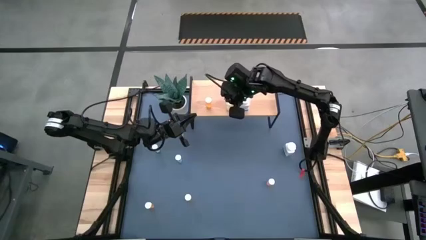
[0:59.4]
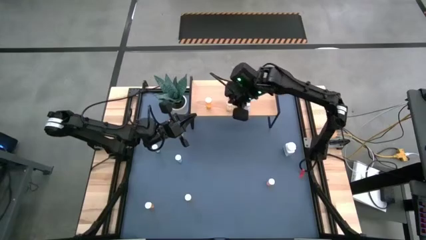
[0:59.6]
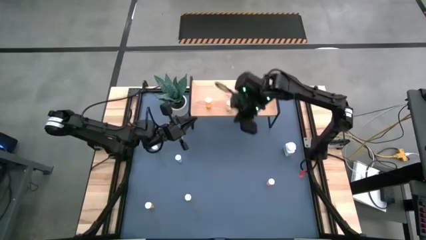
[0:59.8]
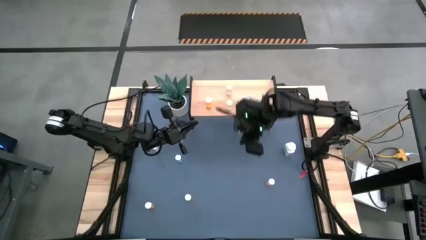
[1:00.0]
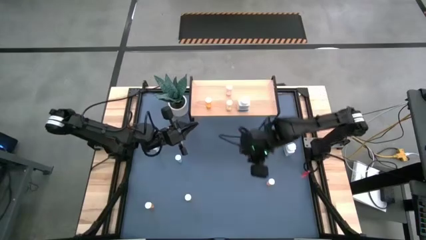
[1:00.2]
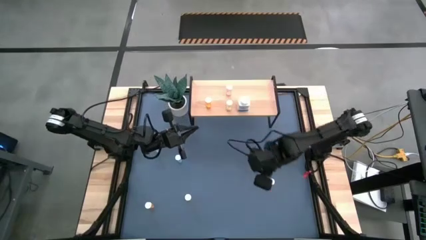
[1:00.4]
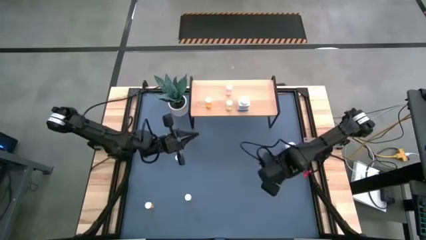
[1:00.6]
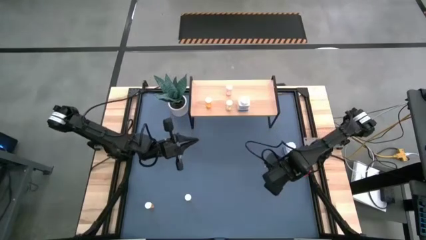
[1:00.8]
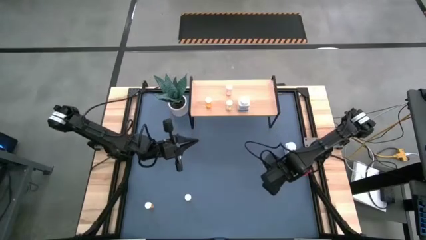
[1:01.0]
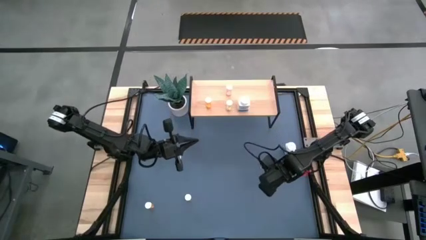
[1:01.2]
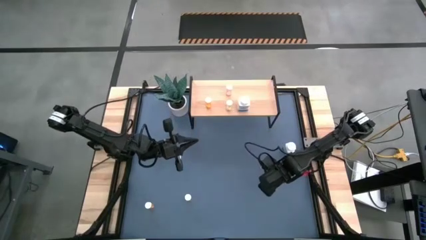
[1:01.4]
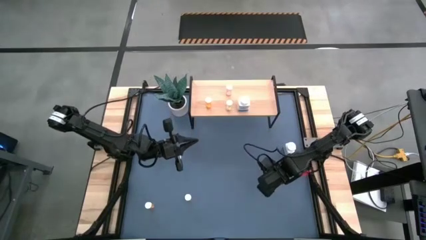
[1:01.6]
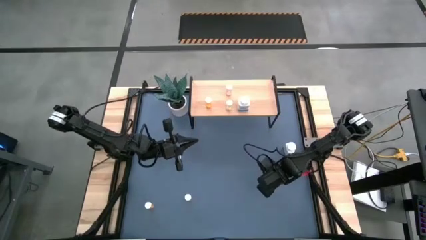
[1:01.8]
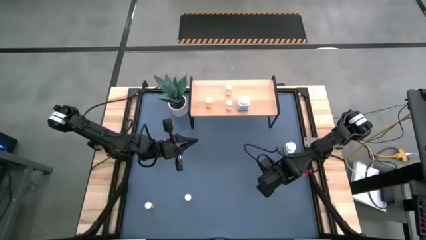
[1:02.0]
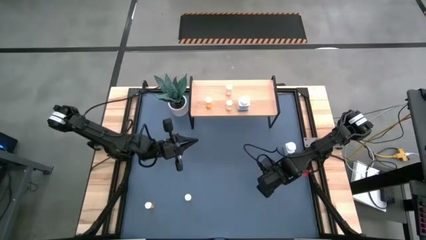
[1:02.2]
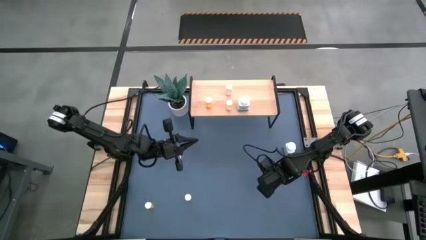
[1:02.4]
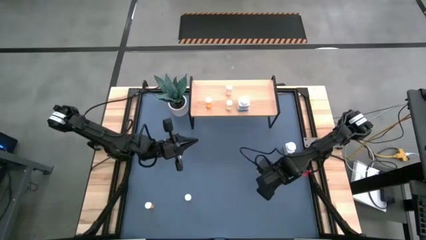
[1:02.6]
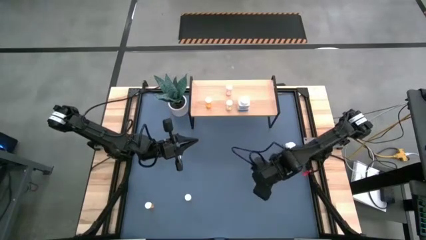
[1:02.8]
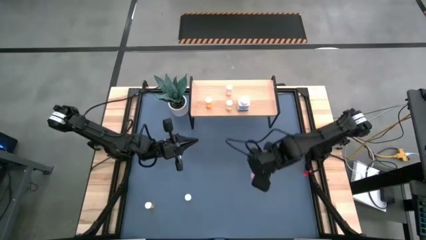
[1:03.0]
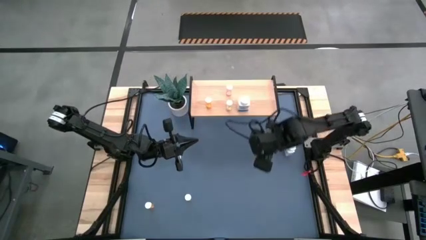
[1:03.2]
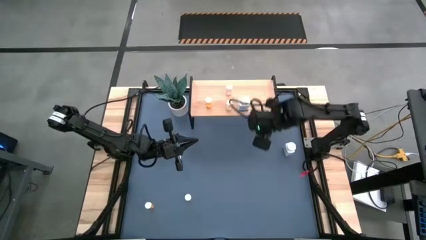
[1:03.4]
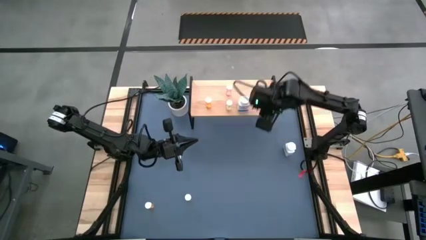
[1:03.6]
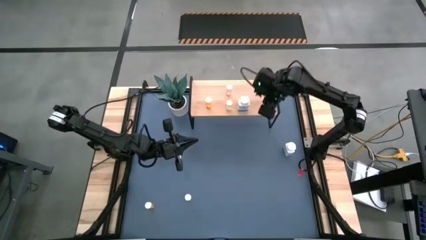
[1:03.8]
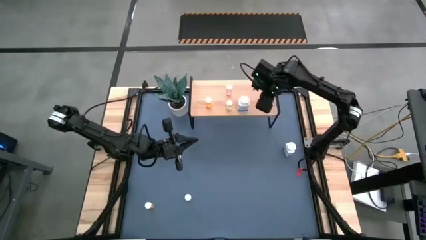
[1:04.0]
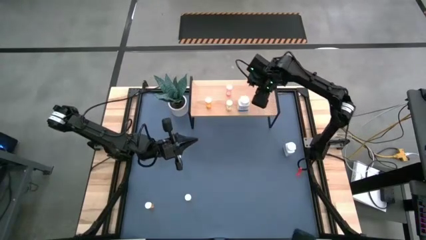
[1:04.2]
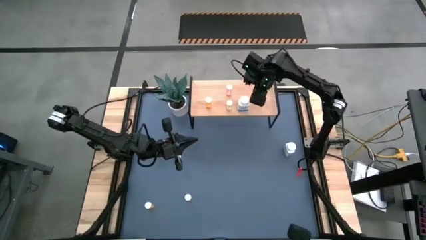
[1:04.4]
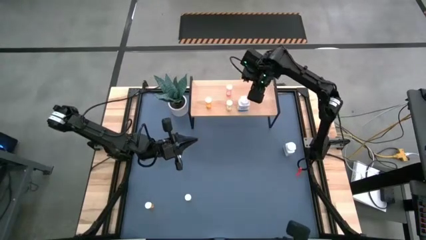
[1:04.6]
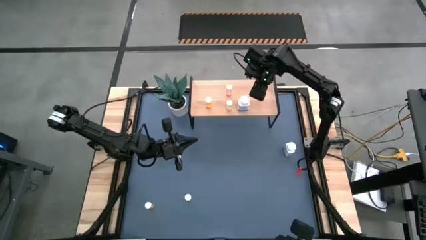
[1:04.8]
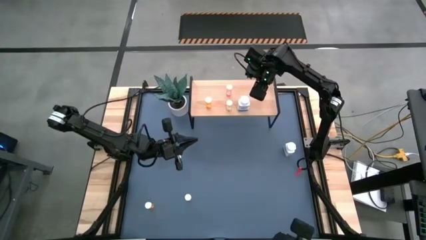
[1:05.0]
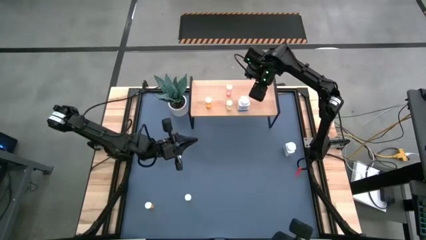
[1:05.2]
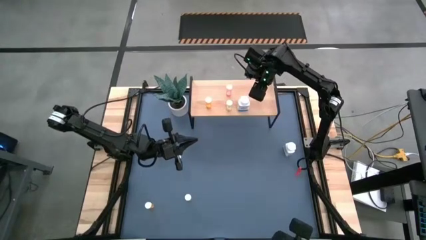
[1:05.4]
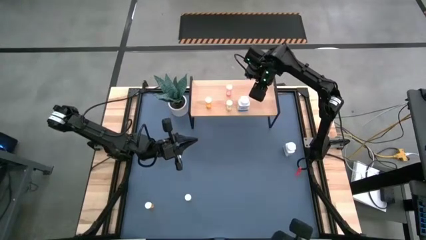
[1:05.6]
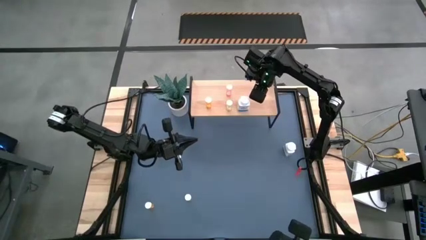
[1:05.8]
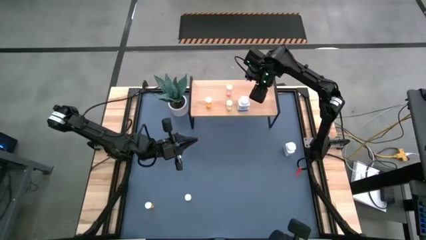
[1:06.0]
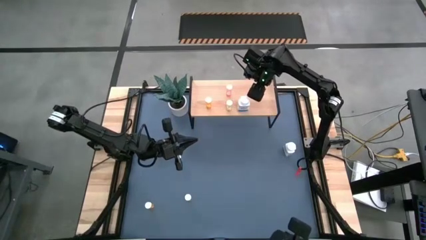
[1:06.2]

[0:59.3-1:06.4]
Task: Pick and place medicine bottles onto shelf by color
Put the pink medicine bottle on the shelf

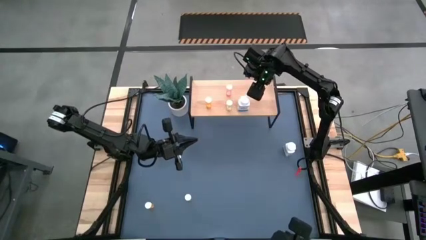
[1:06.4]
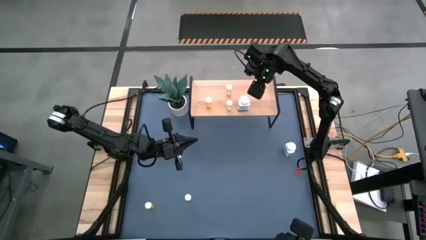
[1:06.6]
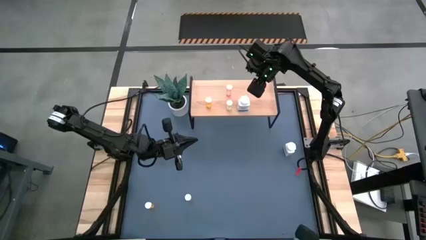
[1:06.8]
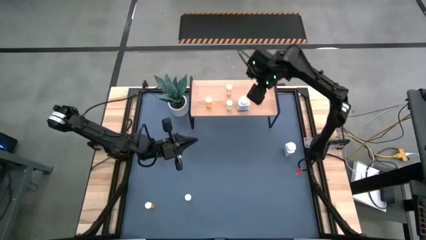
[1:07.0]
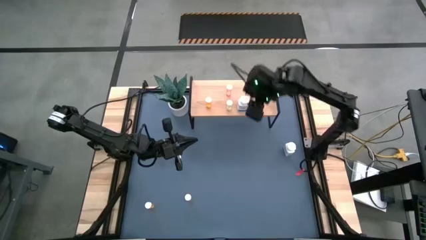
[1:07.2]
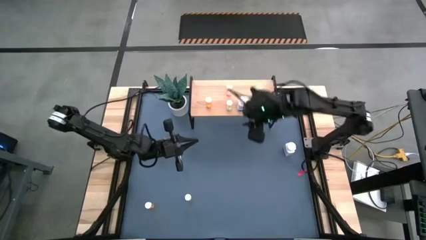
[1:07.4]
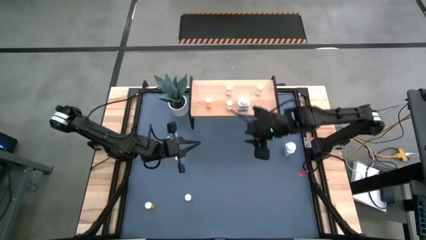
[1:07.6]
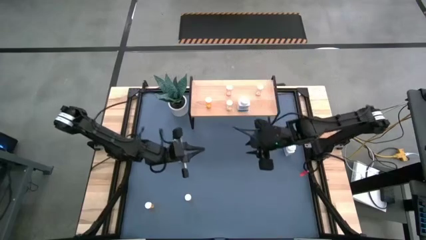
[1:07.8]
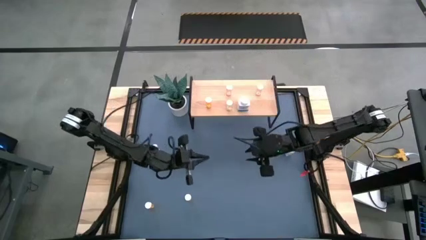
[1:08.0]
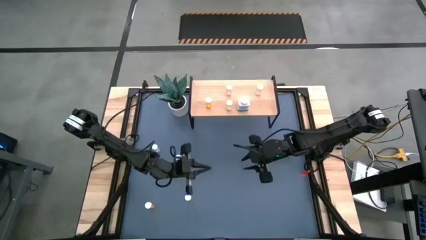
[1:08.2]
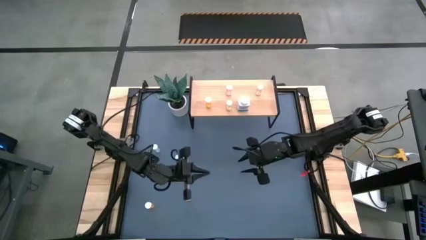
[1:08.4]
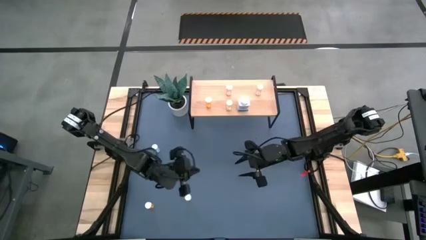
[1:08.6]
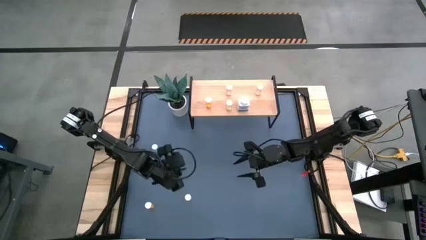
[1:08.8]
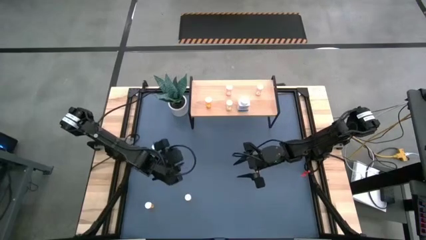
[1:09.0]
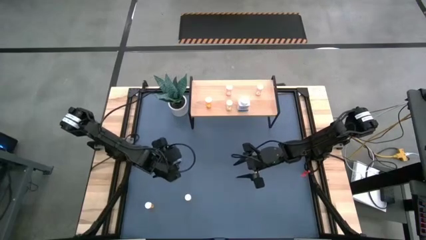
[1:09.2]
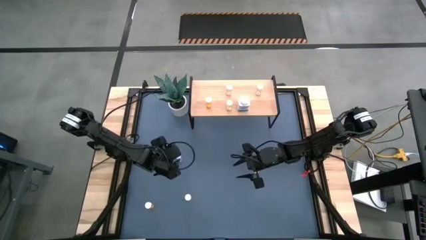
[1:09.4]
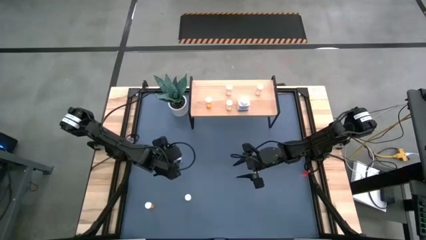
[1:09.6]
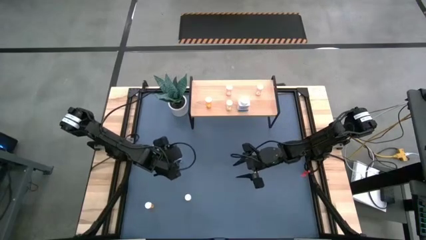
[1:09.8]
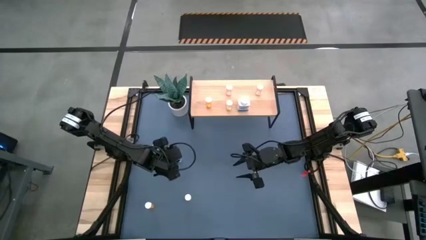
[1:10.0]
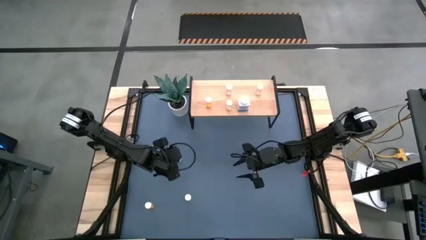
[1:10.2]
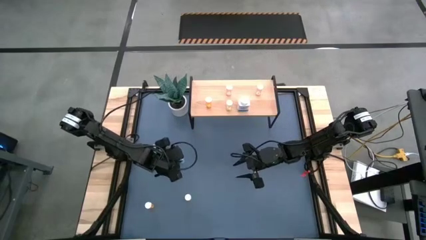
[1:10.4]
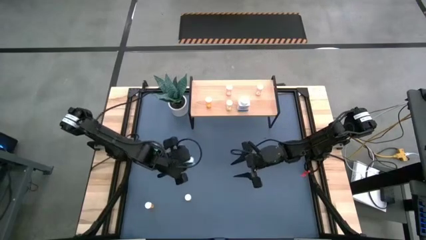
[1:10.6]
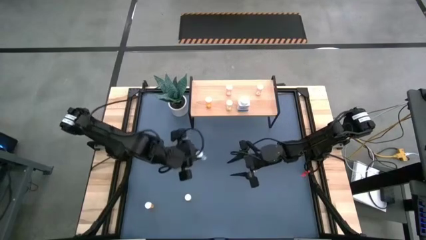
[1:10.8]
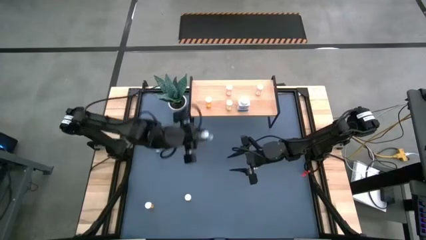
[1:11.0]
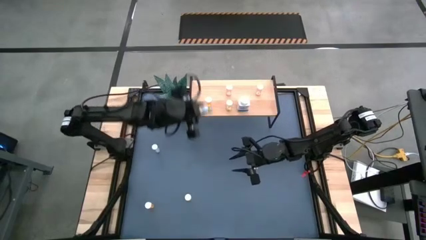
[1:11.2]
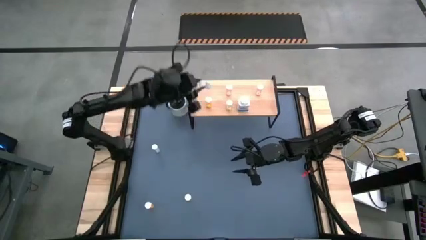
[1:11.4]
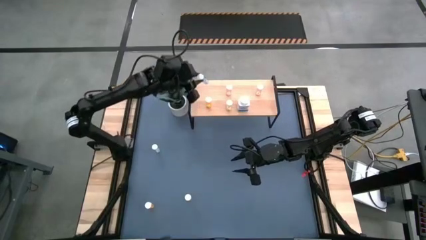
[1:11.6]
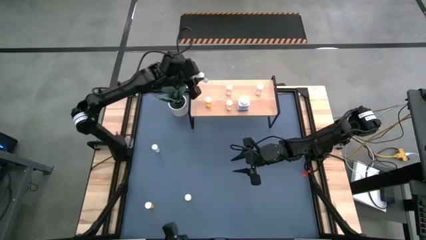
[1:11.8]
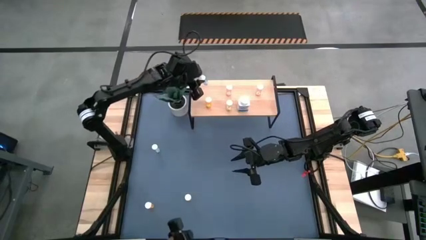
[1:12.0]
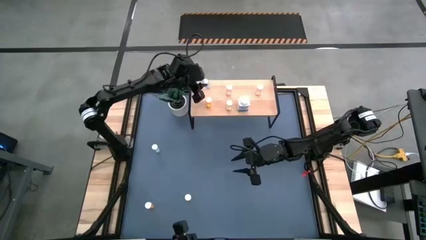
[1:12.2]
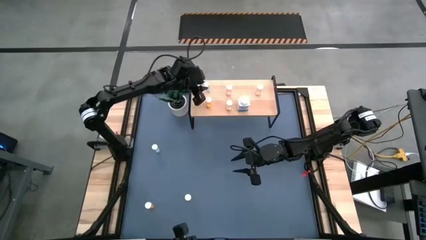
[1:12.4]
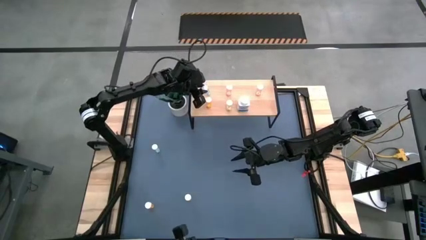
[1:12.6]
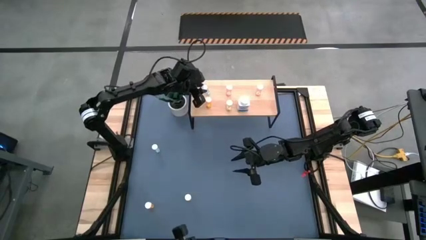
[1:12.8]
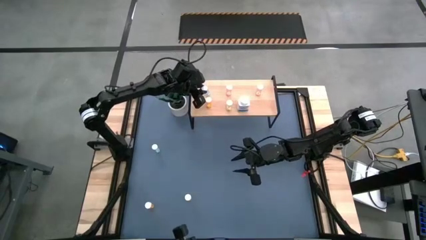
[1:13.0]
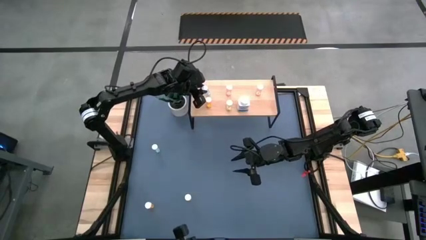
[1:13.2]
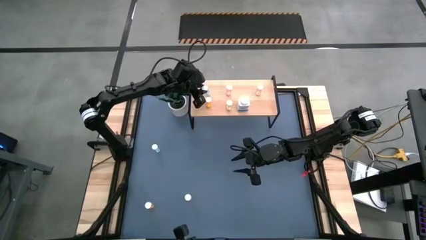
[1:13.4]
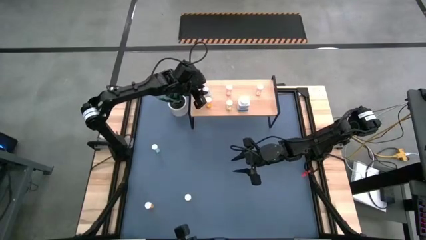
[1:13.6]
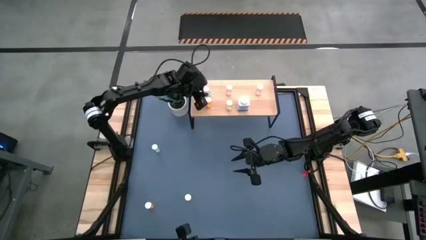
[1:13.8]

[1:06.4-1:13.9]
Put the bottom blue medicine bottle on the shelf
